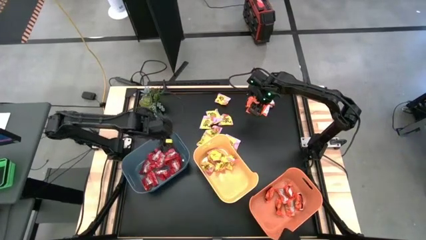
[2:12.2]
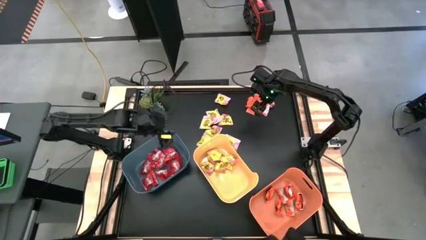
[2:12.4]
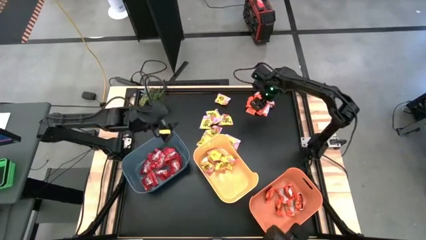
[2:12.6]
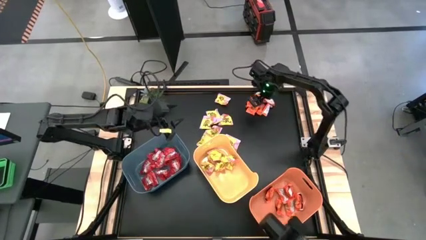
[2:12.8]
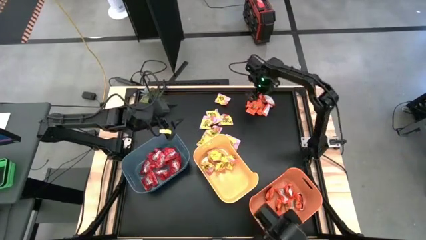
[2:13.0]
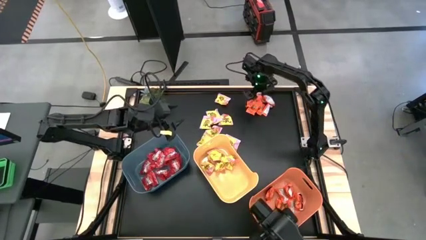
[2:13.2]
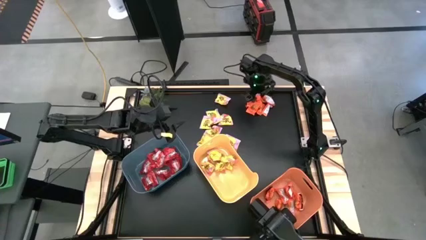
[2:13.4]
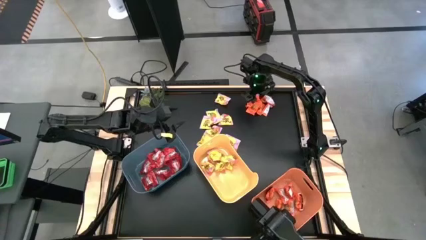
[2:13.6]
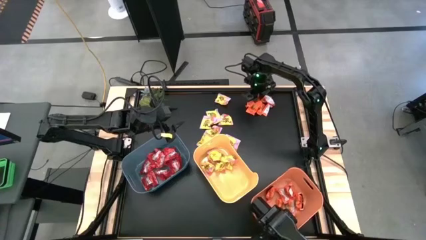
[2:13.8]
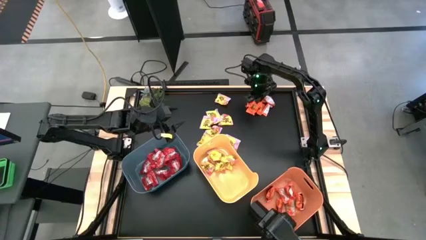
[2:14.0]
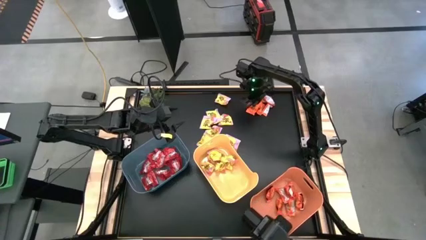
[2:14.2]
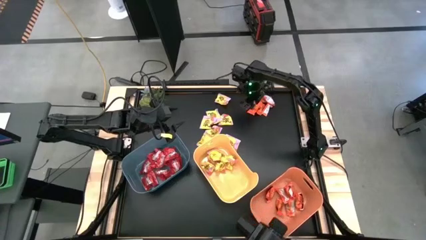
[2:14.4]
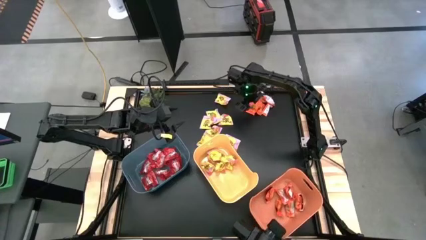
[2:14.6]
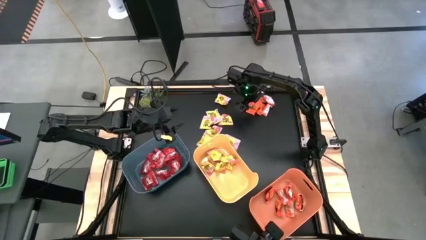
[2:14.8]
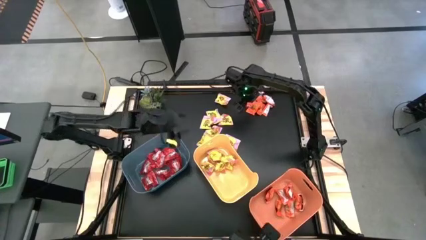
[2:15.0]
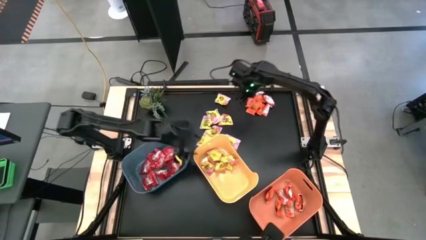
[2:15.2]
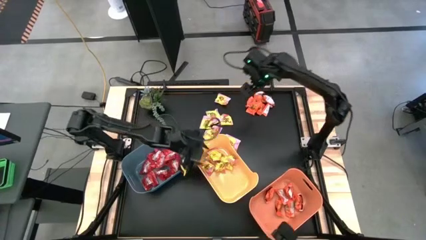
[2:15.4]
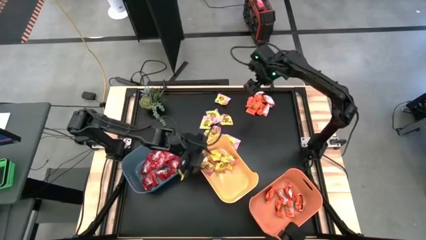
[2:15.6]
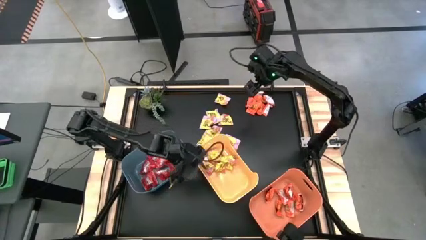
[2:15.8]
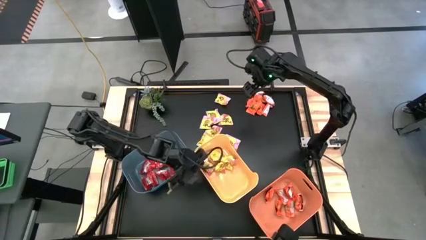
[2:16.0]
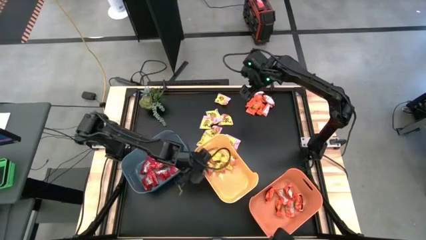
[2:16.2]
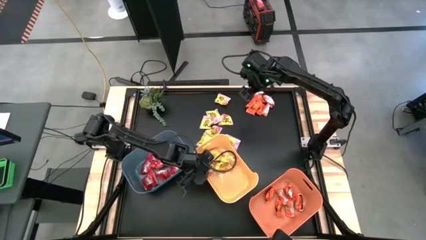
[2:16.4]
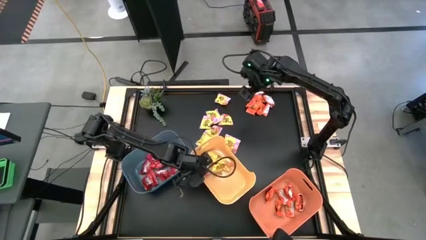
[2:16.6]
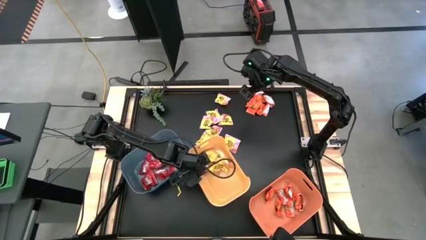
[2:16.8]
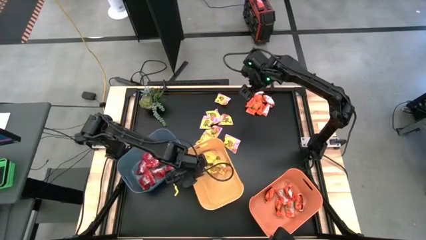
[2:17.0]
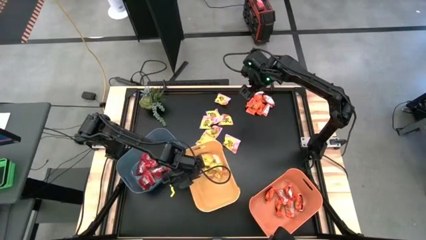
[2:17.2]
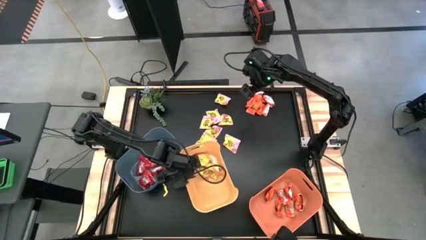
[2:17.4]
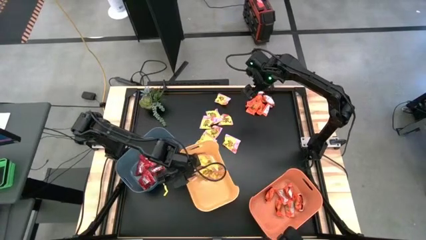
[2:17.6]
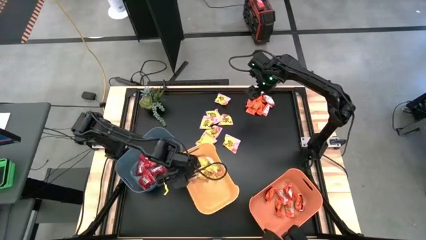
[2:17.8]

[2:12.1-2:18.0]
Task: Sort candy
Adjust the yellow bin

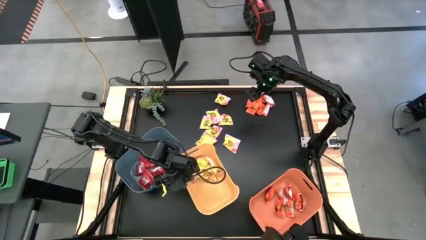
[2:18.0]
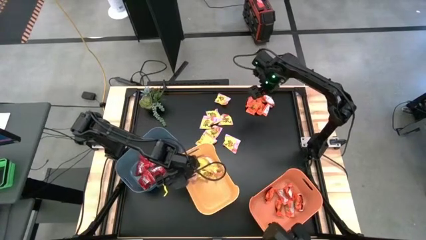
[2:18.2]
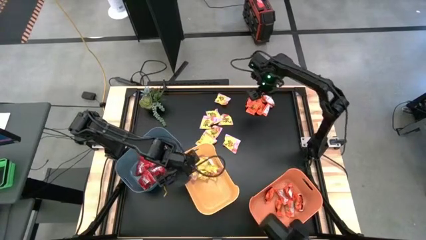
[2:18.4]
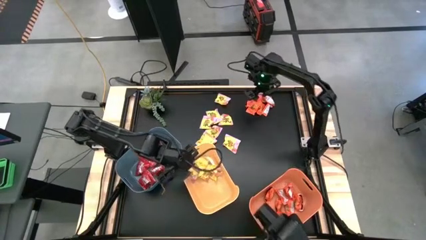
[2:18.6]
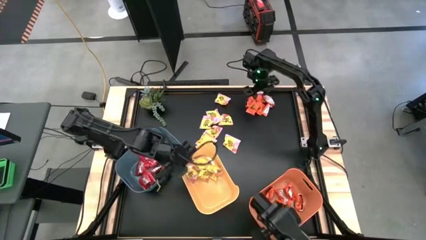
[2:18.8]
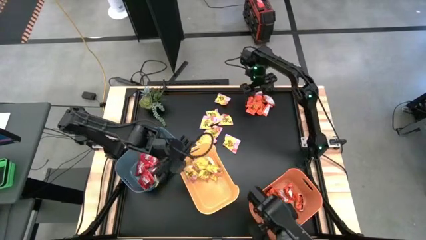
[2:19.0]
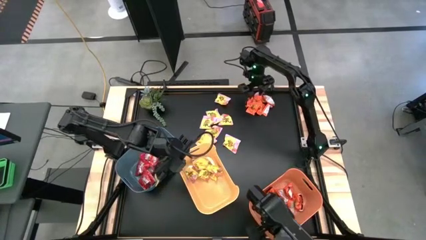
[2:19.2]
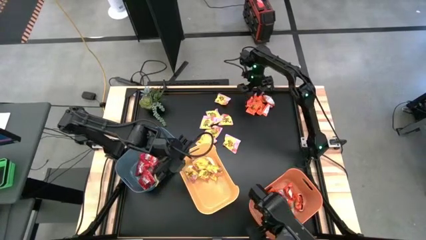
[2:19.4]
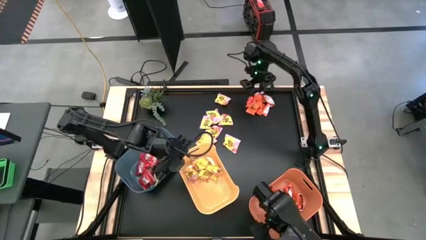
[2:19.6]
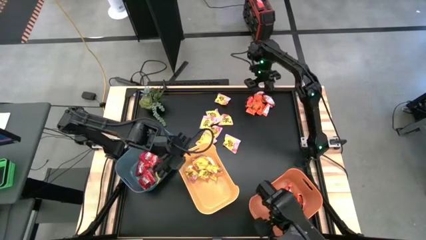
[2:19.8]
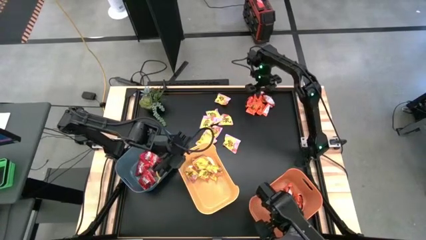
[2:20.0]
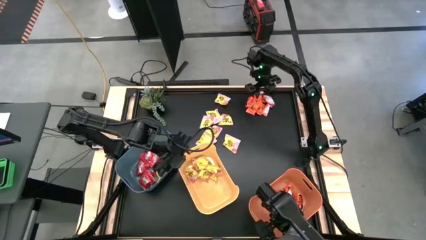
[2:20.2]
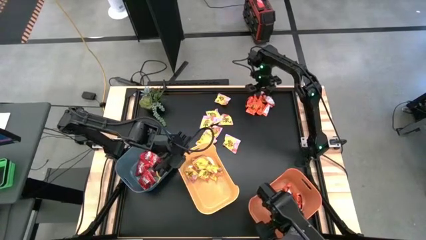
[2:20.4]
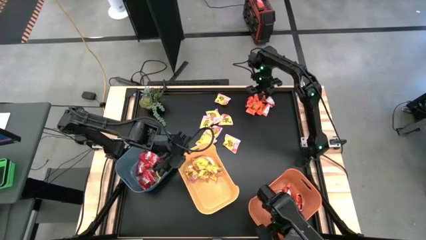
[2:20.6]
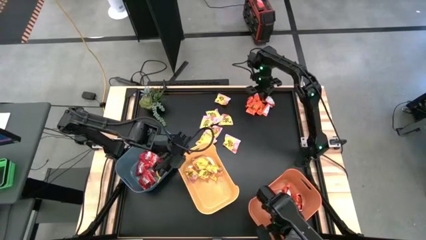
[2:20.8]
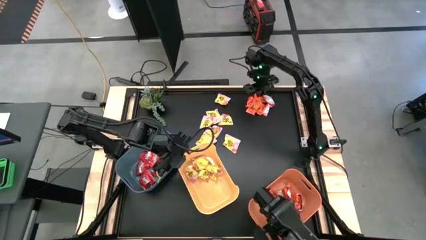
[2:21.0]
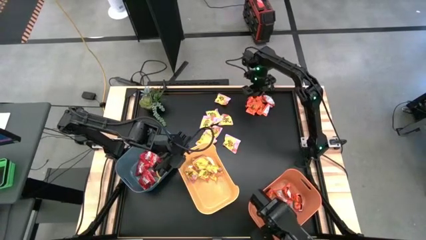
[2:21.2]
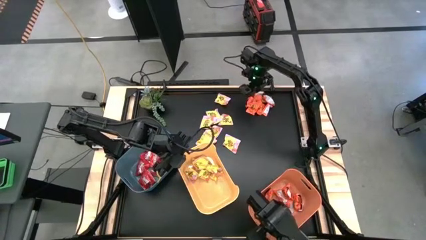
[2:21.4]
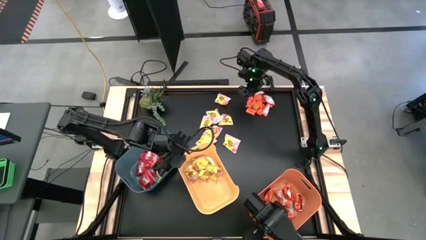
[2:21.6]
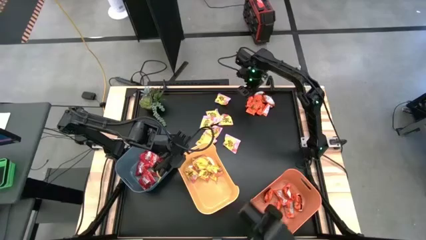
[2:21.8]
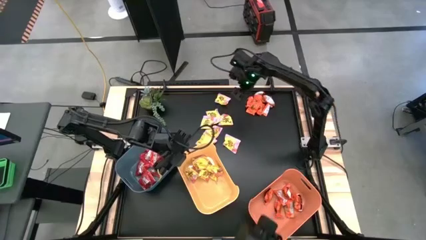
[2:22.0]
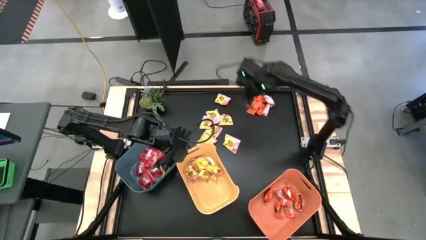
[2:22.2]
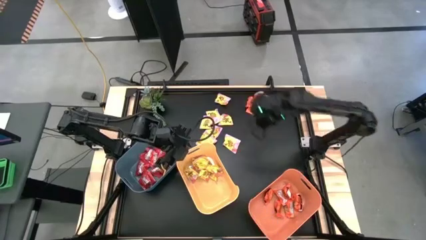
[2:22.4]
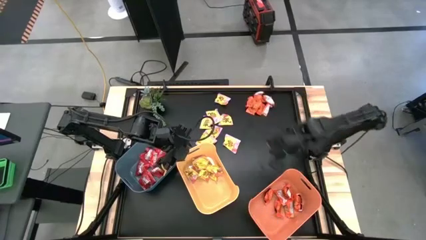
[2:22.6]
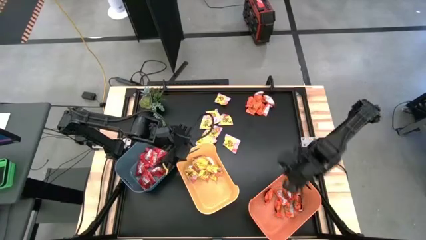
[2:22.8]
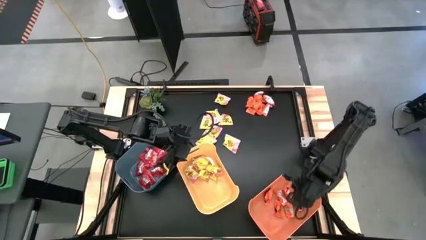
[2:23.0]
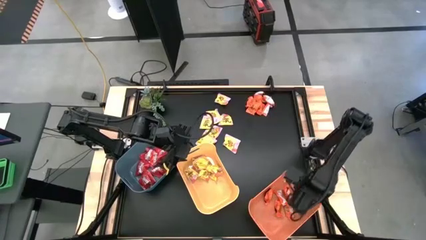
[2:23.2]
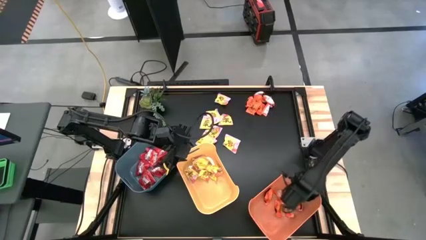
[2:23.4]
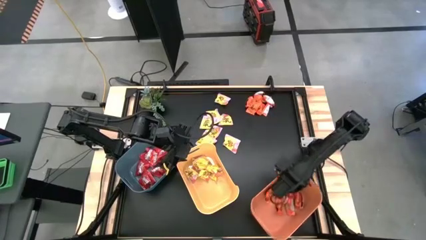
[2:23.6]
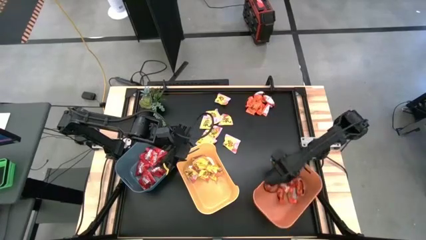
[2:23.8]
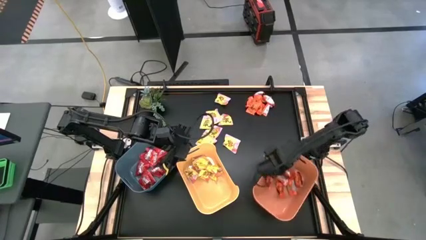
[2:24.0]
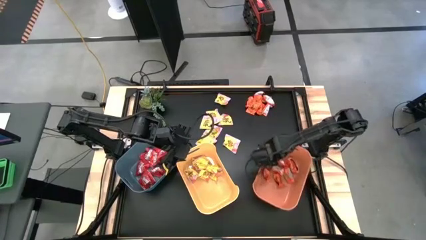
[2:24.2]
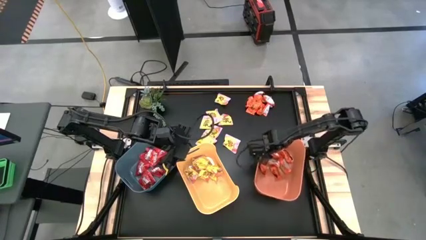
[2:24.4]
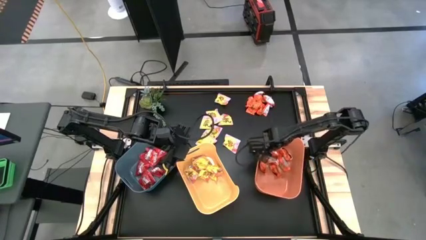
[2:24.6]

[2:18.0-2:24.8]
Put the orange chocolate into the orange bin

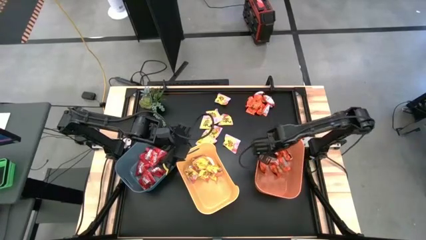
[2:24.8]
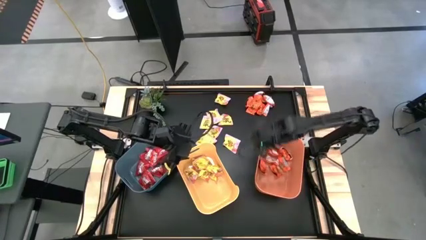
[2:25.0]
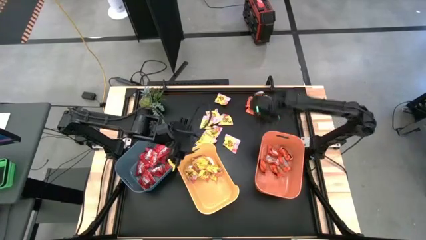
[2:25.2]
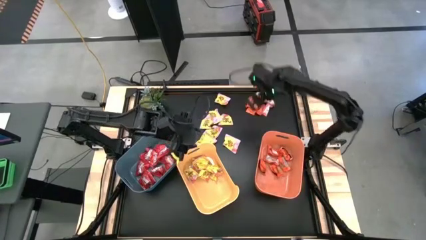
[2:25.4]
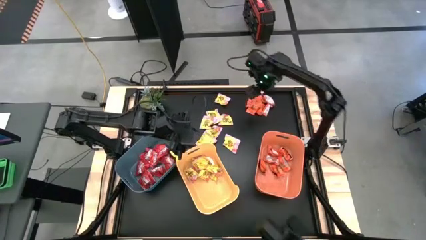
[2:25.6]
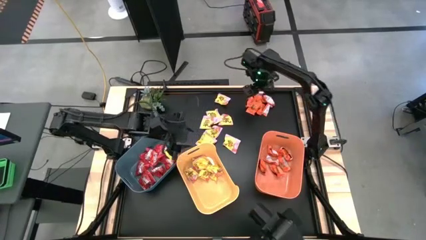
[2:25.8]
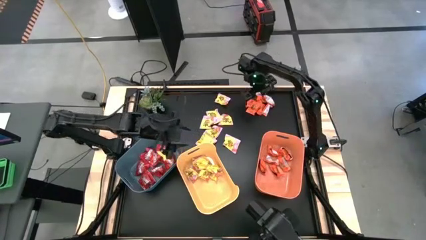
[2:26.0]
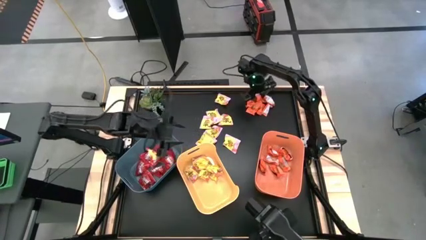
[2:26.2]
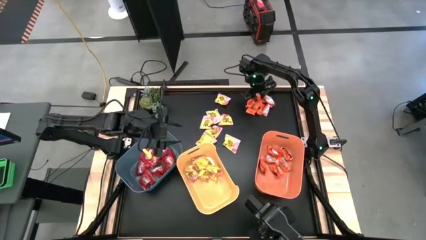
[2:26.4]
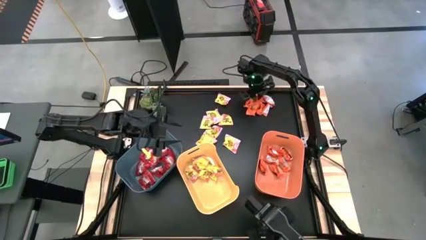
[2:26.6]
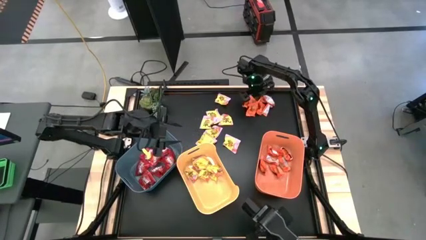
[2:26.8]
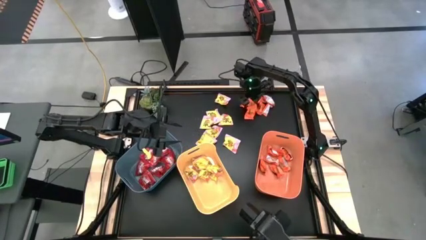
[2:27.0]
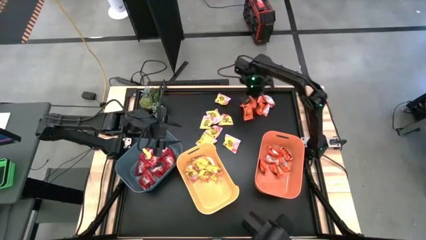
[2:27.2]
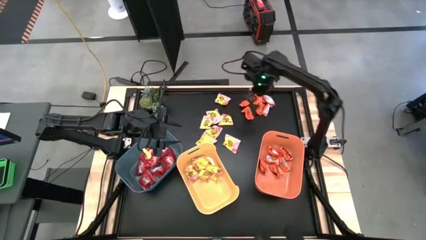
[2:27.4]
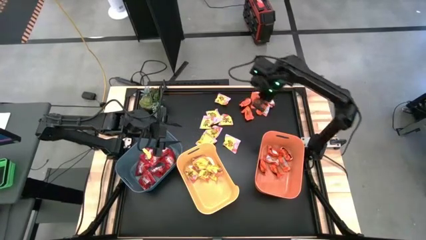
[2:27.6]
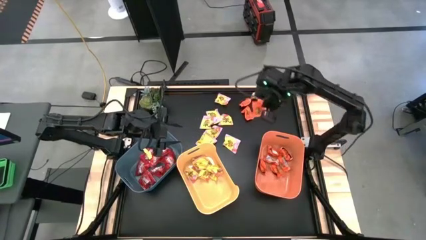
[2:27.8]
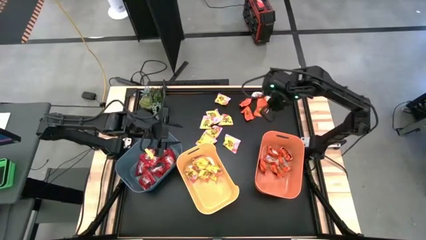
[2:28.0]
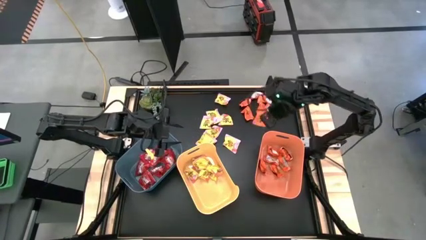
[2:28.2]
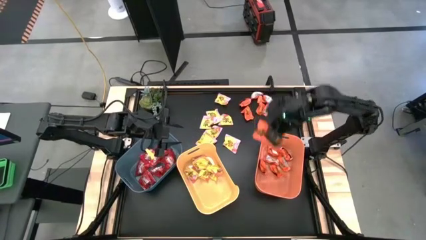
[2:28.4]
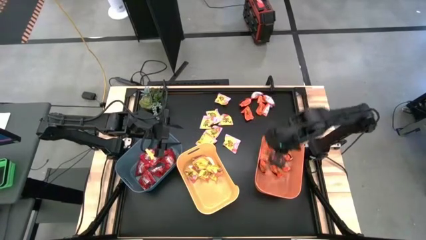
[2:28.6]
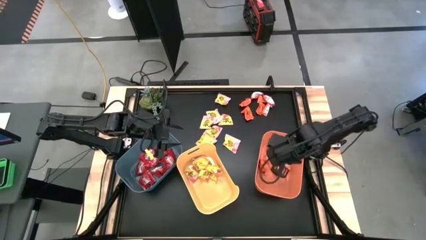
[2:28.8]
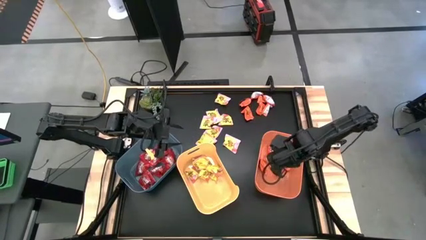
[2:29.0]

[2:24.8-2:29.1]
Put the orange chocolate into the orange bin
